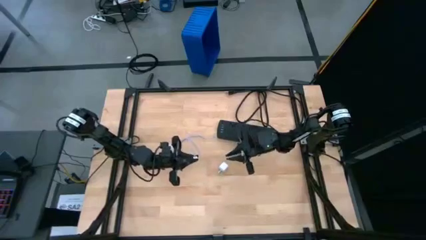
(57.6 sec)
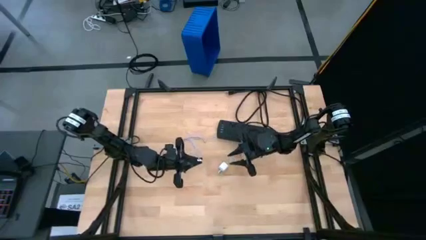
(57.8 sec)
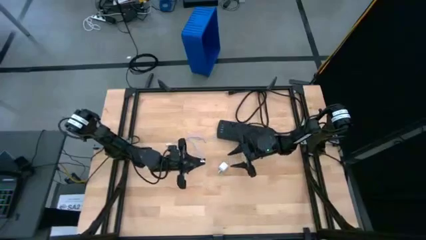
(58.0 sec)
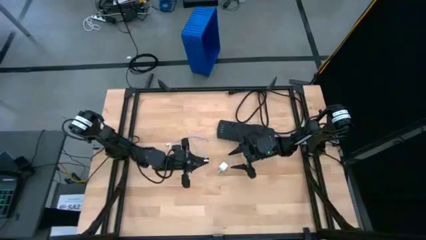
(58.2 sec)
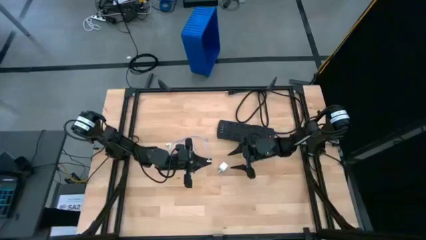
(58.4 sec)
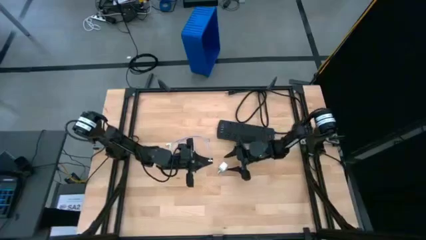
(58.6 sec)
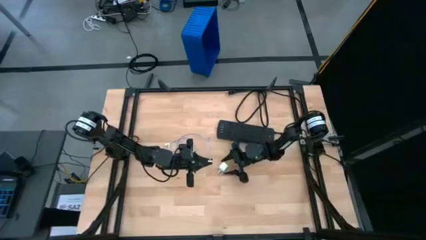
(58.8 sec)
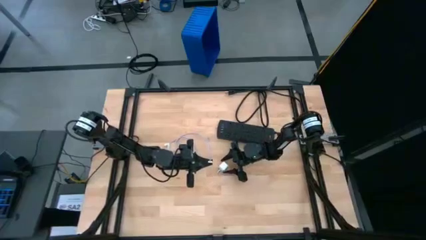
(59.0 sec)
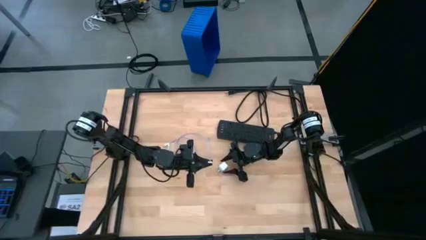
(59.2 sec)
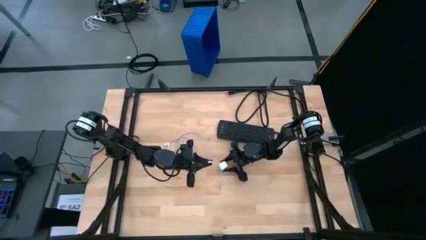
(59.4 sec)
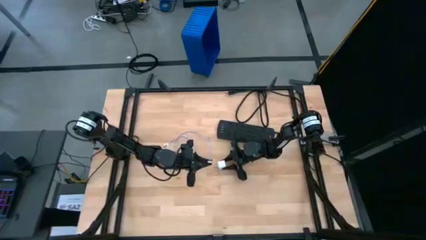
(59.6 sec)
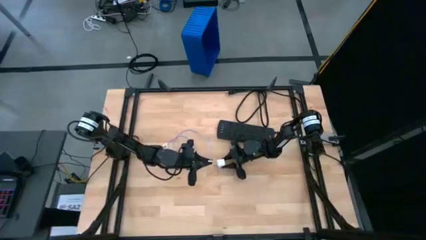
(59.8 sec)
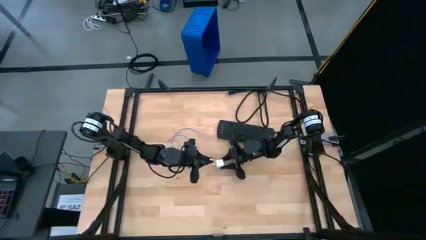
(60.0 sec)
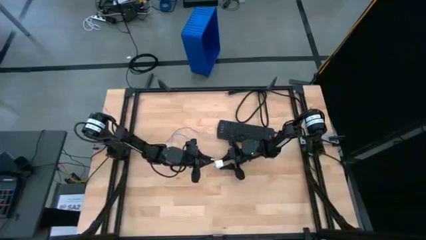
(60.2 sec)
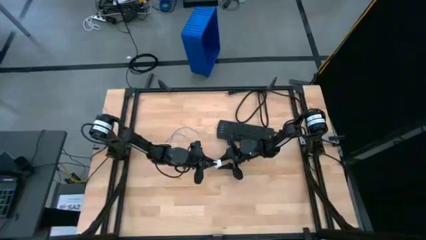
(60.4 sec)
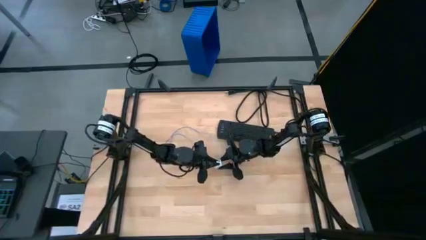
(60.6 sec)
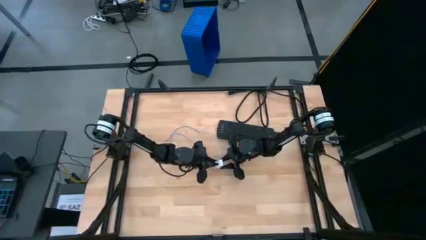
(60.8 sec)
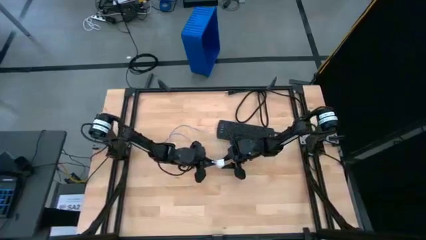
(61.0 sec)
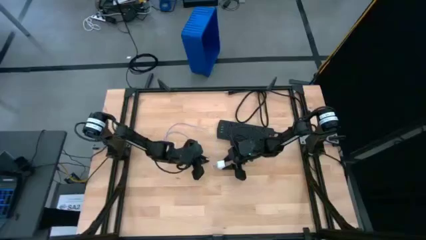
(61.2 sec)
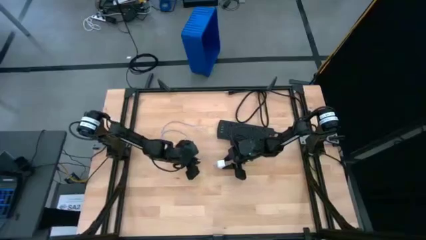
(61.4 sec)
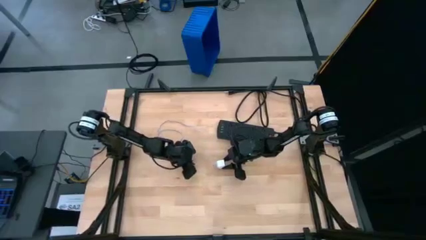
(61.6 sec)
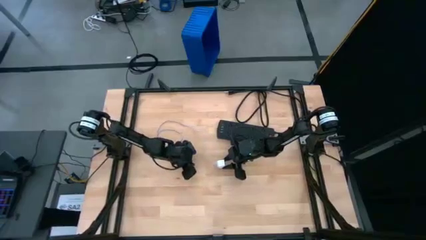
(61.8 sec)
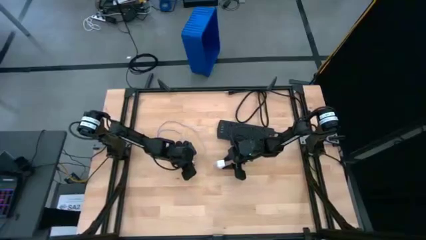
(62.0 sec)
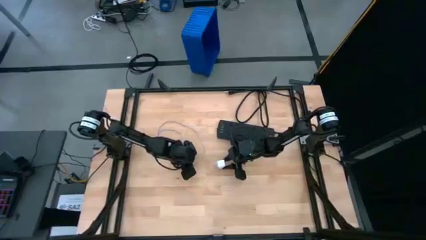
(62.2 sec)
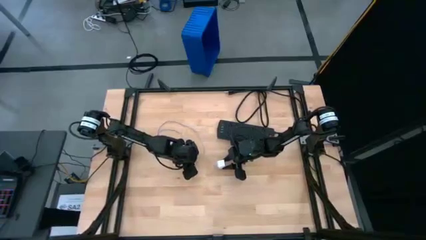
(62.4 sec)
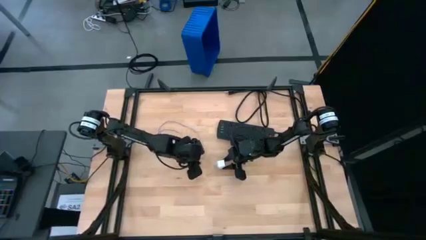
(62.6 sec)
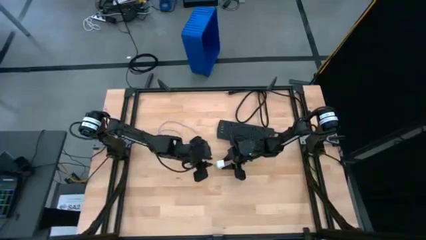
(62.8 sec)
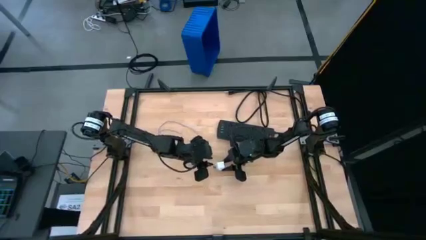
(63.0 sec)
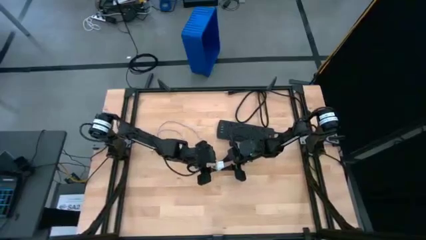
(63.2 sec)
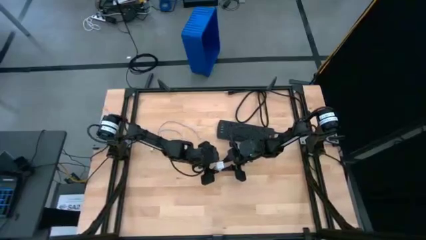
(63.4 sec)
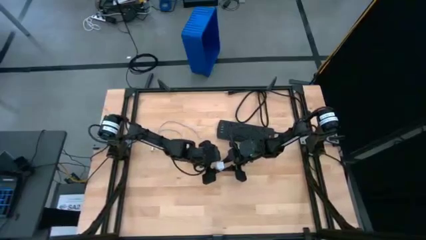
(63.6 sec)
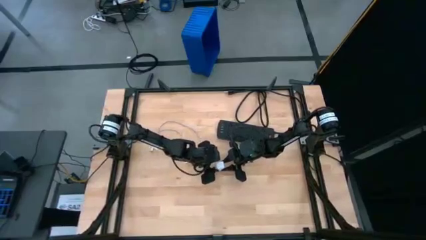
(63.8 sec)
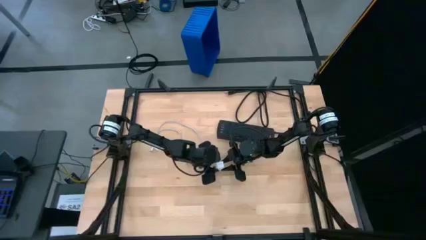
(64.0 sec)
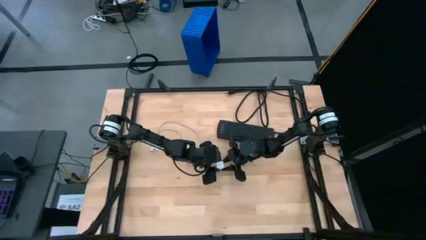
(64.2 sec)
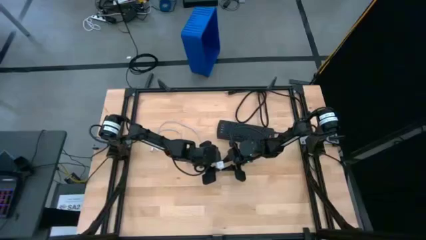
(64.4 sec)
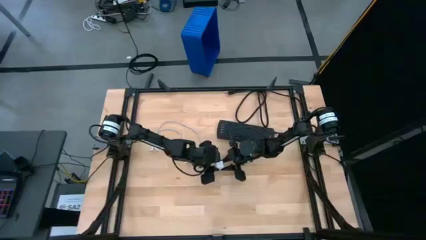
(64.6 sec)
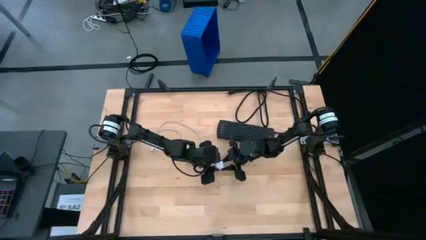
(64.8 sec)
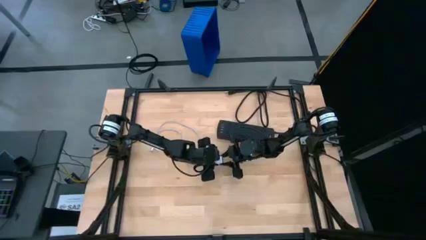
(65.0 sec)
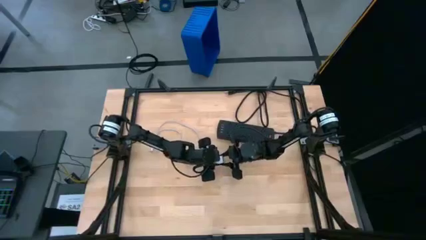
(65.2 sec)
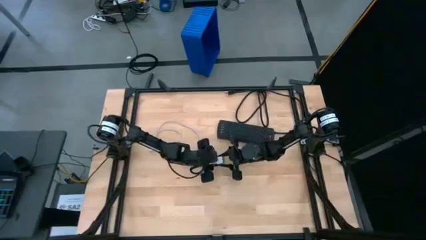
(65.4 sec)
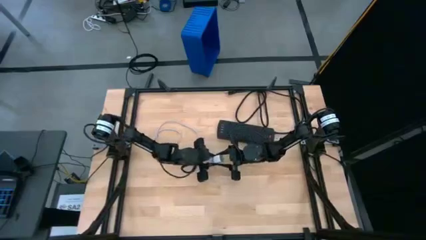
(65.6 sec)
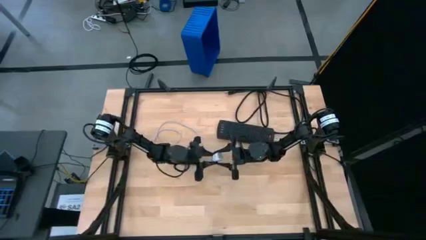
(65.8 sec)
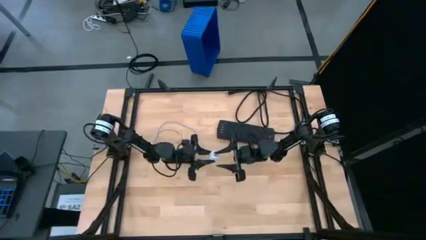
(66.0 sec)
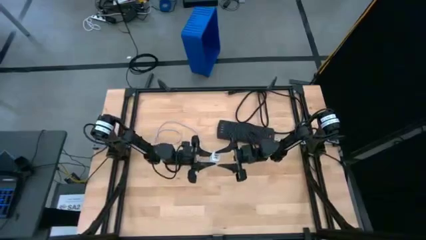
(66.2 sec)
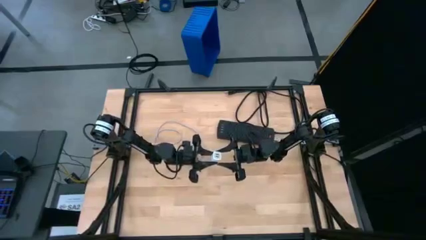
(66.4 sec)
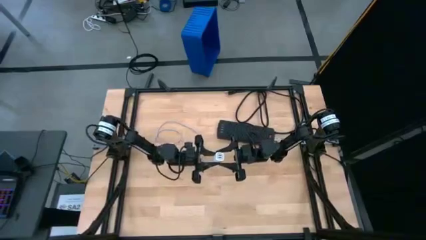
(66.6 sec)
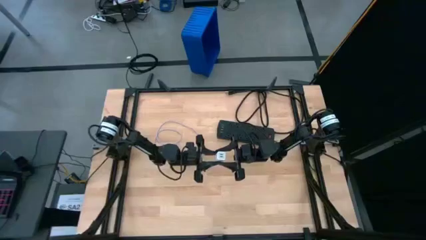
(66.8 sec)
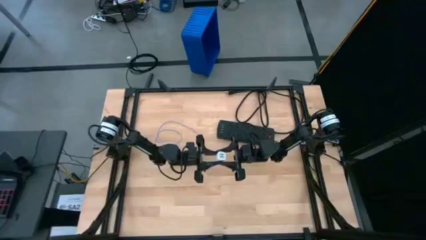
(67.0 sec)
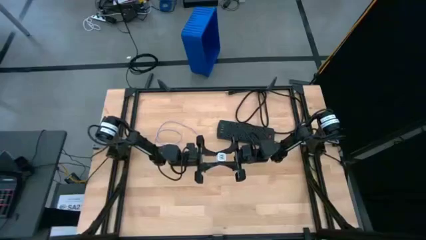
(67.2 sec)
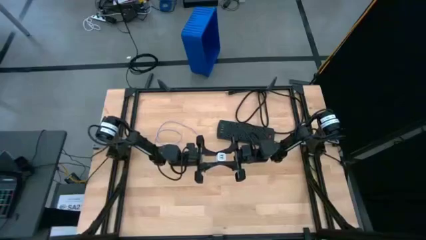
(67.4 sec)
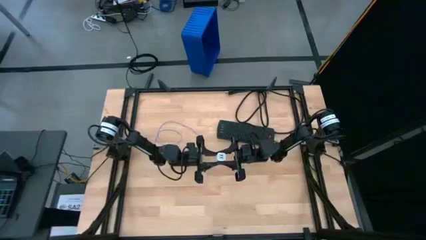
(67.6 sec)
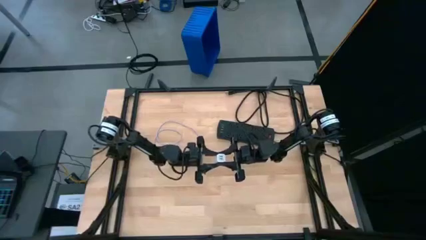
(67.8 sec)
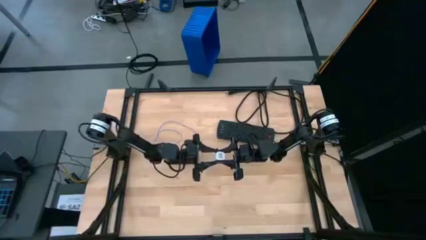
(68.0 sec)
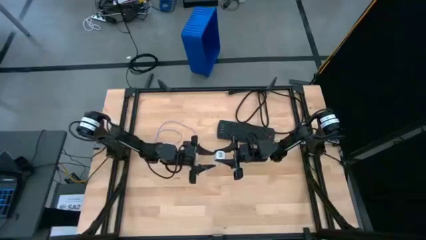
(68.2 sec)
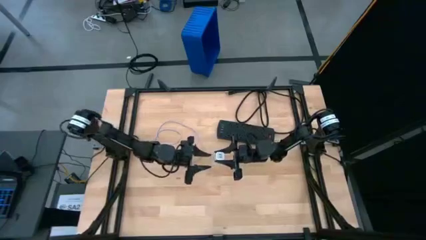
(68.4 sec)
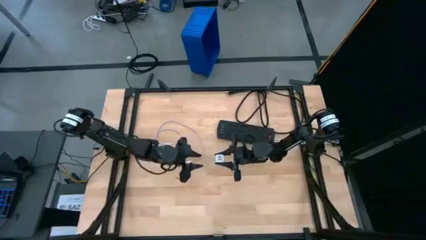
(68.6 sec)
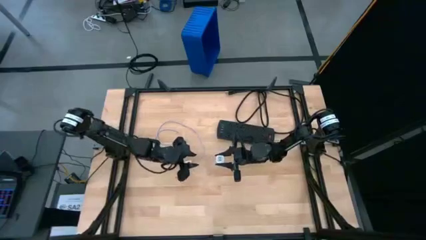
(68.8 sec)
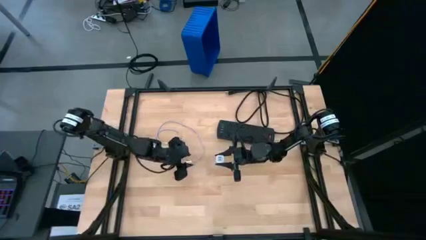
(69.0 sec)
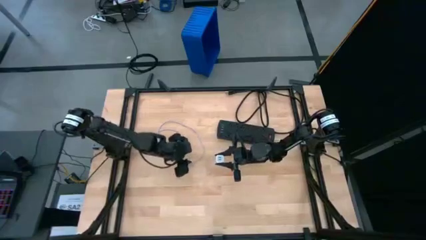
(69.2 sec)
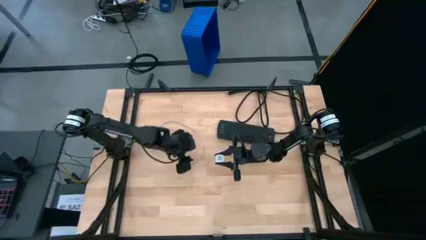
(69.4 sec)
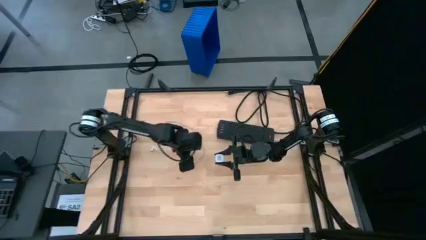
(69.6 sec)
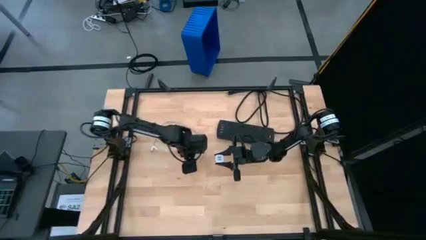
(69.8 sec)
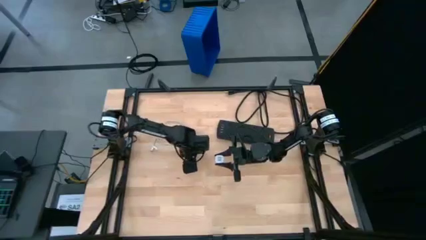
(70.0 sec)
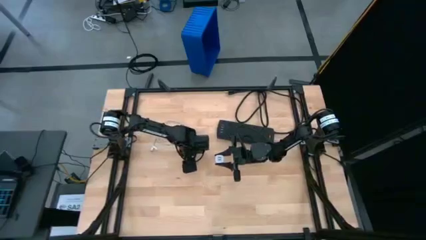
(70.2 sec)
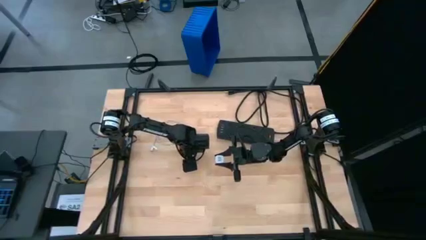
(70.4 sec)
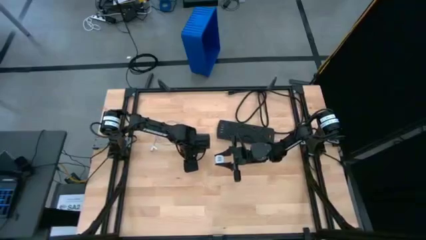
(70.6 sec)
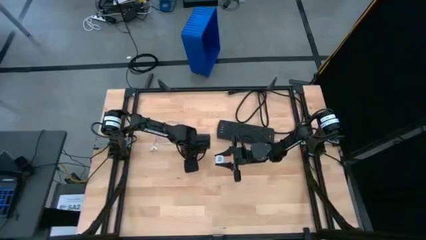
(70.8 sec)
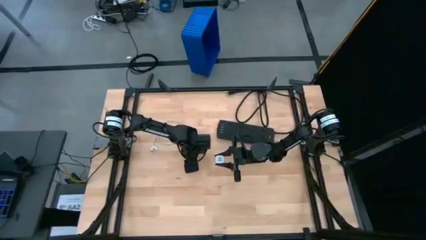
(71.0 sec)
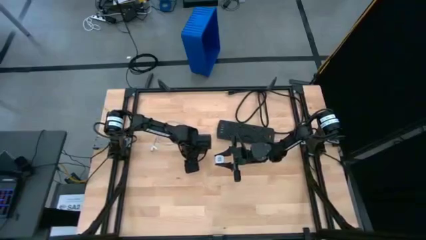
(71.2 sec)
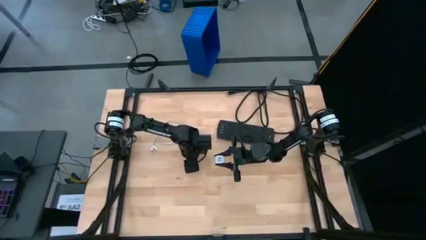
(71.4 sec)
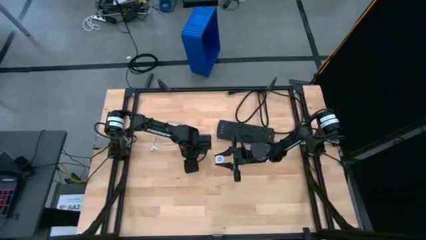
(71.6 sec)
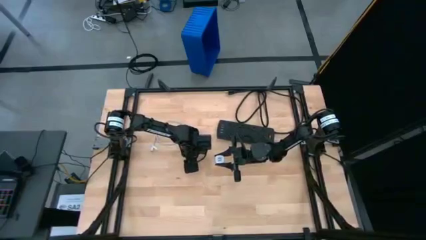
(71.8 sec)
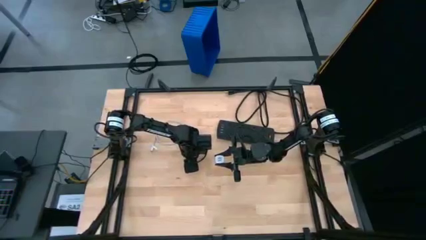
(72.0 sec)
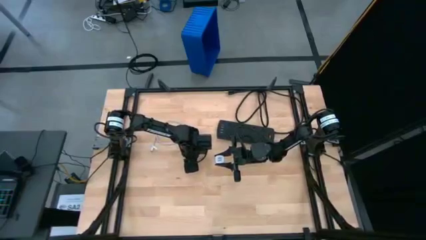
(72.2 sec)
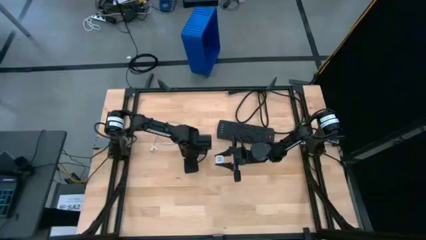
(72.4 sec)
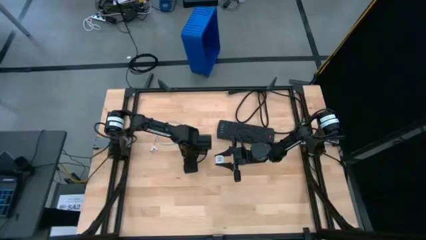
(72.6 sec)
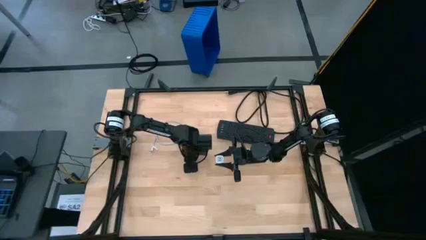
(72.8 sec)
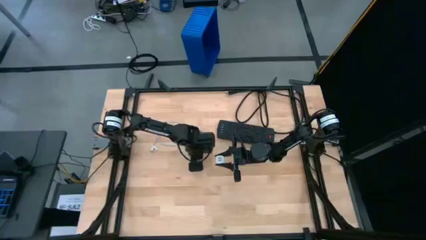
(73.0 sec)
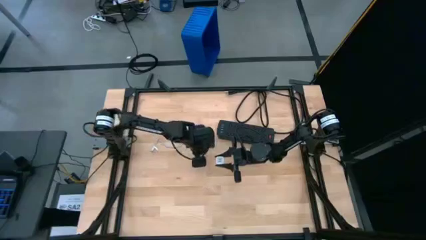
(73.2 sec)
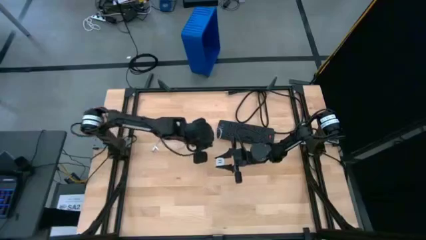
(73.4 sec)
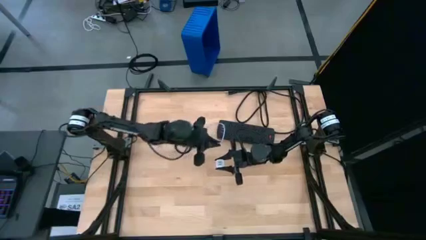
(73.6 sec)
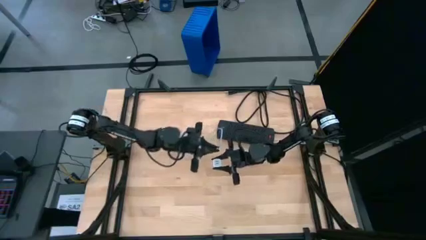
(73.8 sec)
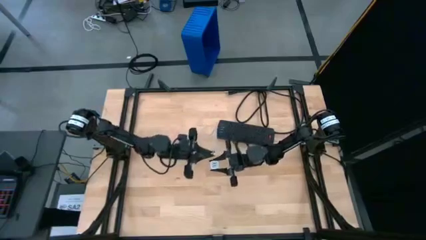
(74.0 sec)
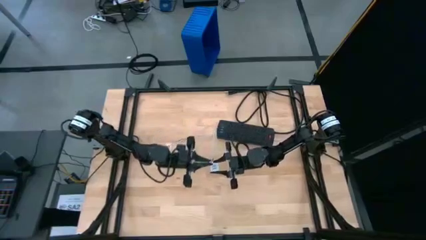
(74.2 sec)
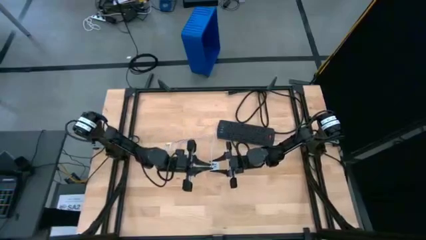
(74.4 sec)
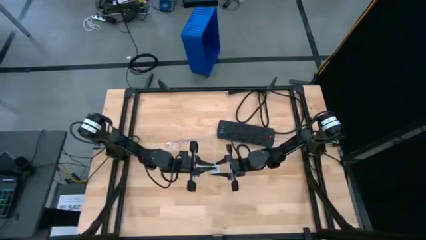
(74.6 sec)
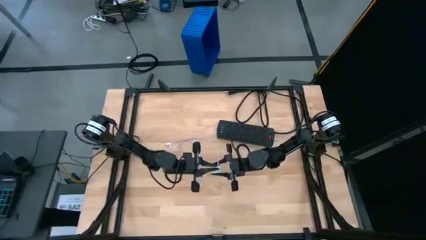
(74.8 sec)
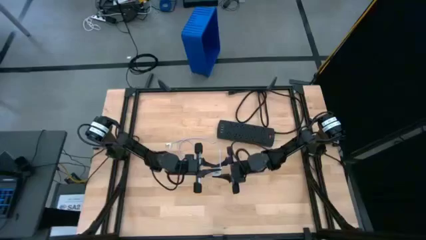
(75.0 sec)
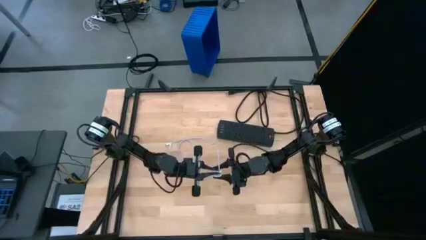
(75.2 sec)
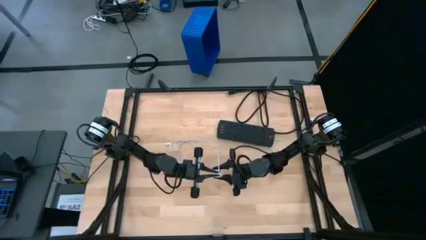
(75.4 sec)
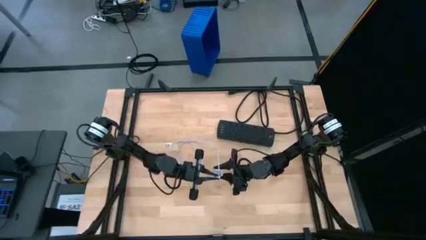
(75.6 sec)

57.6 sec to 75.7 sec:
Task: Insert USB
Insert the white charger cable into the white charger adapter
